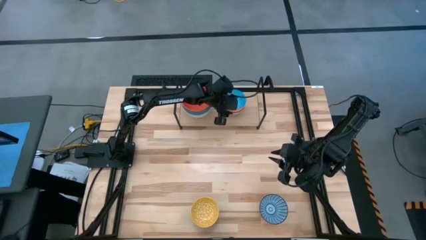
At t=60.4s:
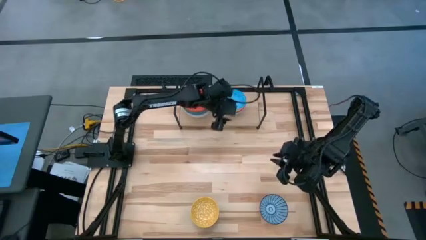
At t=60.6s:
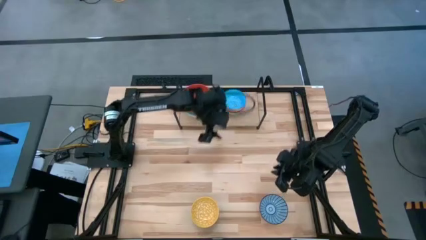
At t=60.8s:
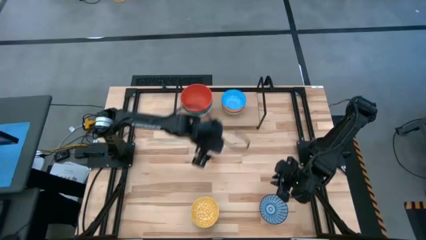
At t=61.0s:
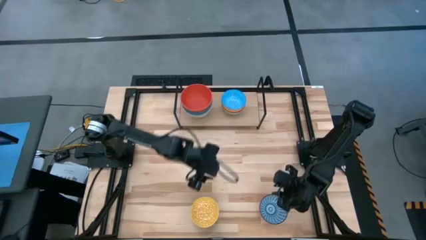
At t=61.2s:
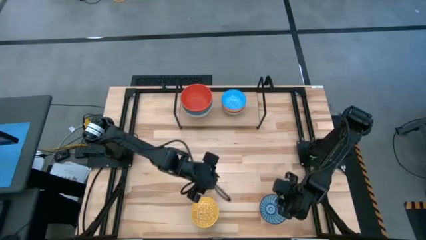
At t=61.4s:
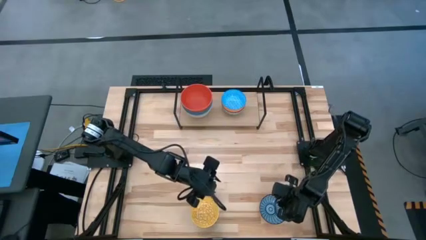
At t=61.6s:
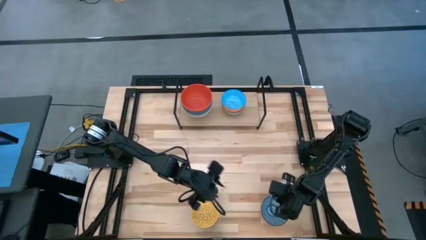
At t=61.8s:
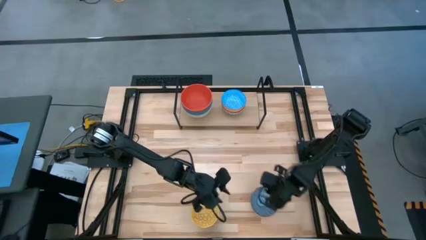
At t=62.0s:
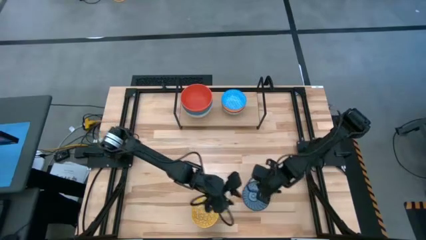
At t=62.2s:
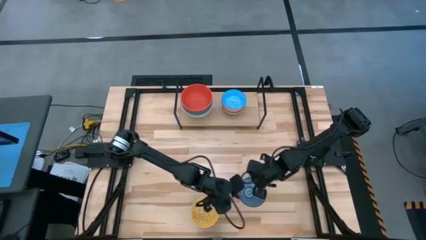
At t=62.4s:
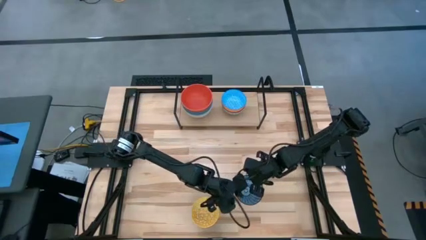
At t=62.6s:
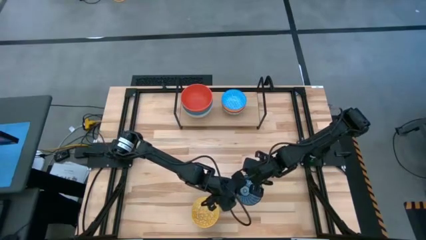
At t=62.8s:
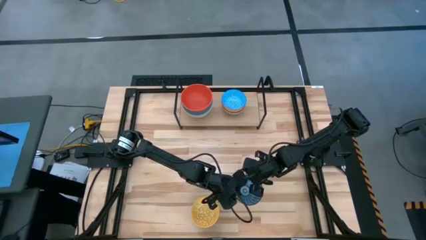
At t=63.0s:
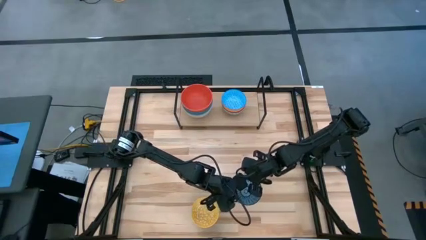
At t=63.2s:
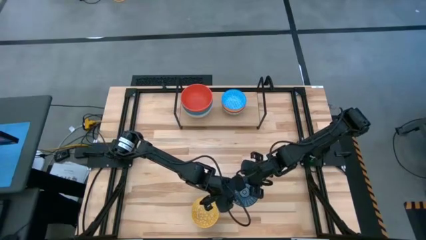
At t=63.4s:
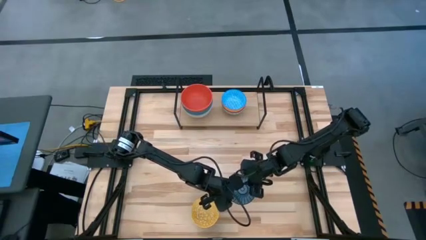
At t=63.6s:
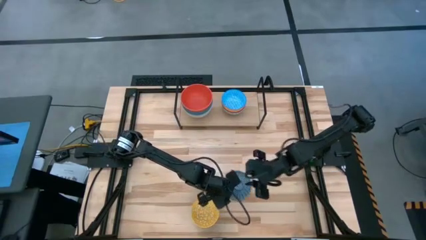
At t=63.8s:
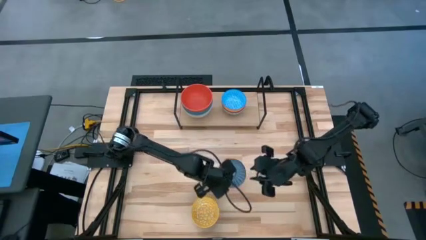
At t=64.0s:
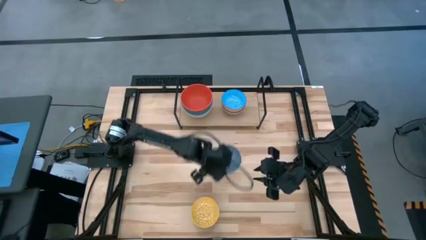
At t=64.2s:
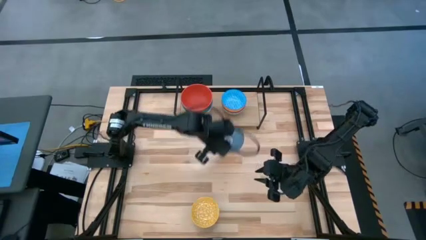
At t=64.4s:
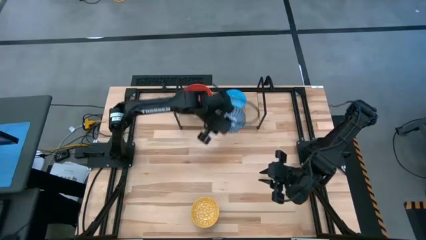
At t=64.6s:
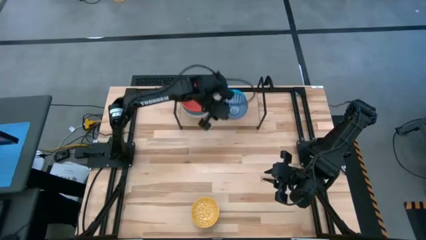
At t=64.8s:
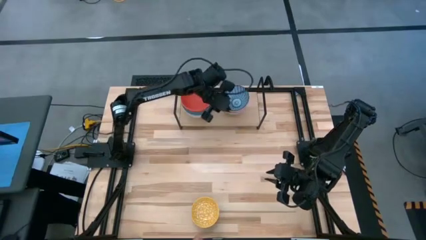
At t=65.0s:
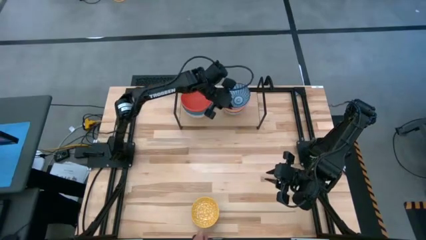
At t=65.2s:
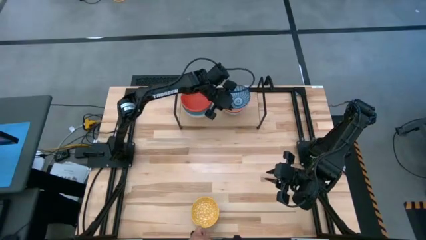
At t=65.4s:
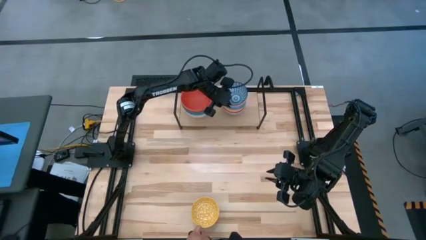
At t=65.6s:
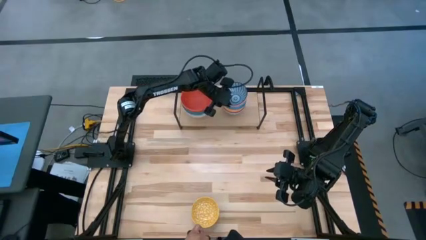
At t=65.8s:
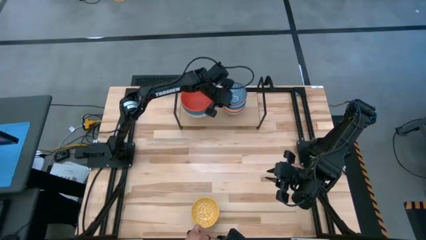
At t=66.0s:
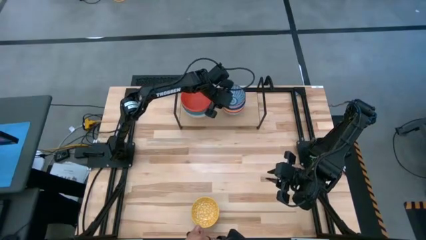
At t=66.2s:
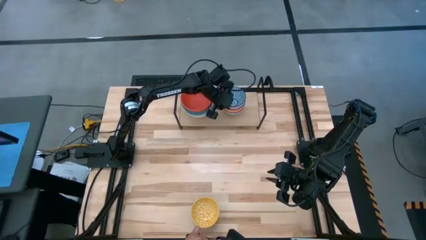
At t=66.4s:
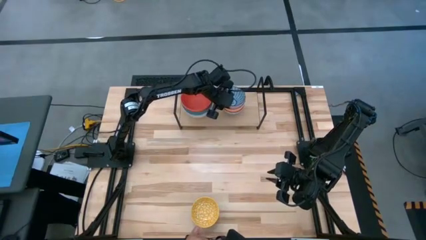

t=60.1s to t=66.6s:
Task: Place and stack bowls onto a shelf
Stack the blue pattern bowl on top of the light blue pattern bowl on the shelf

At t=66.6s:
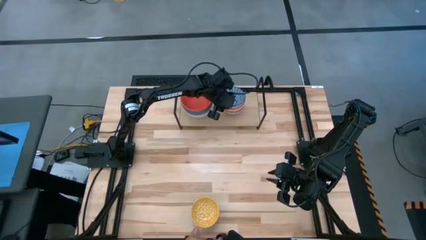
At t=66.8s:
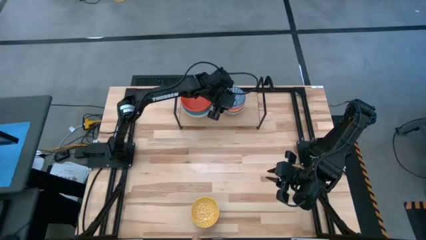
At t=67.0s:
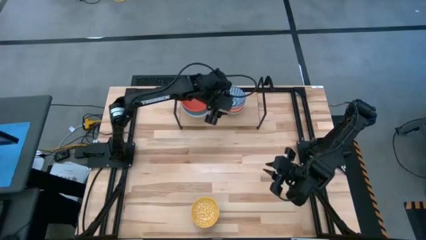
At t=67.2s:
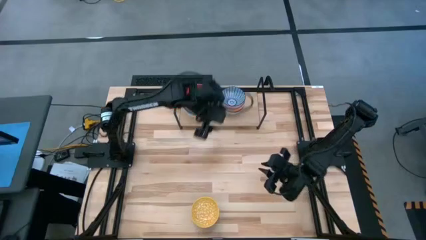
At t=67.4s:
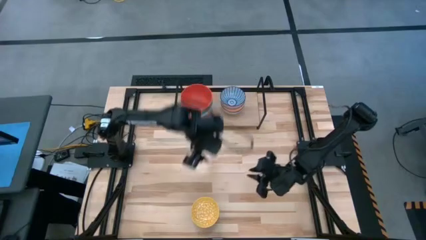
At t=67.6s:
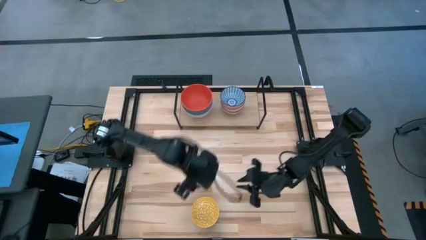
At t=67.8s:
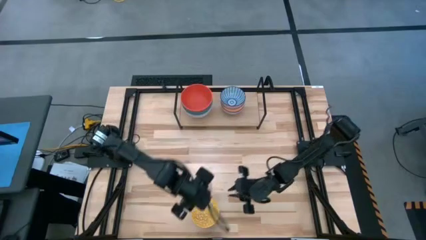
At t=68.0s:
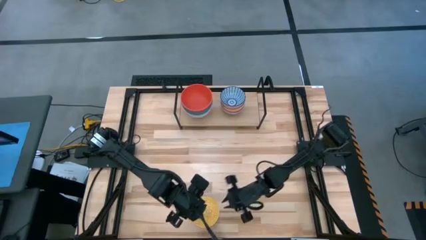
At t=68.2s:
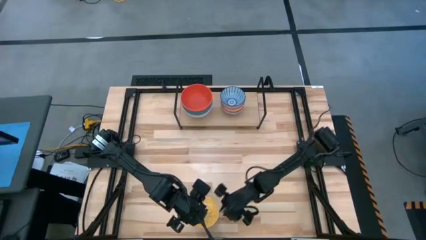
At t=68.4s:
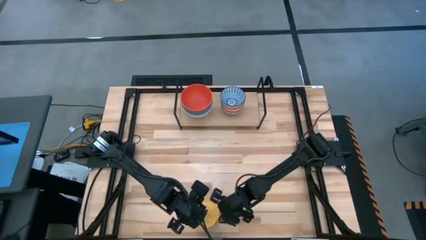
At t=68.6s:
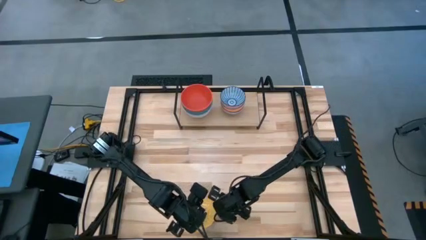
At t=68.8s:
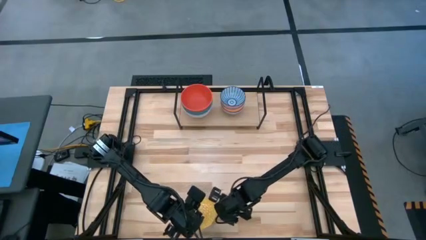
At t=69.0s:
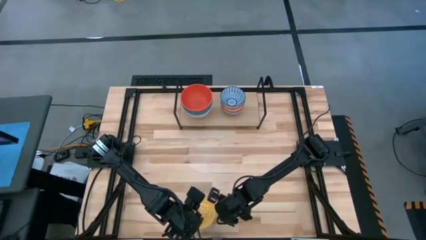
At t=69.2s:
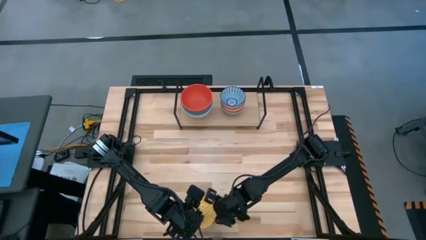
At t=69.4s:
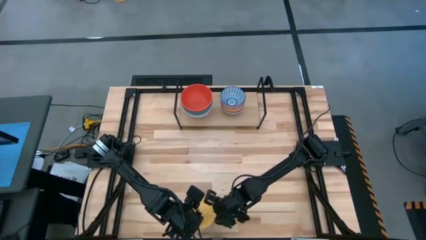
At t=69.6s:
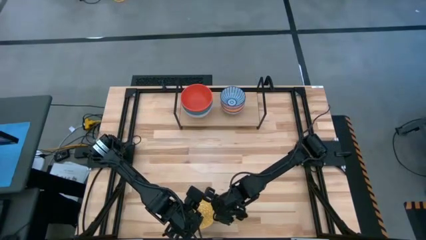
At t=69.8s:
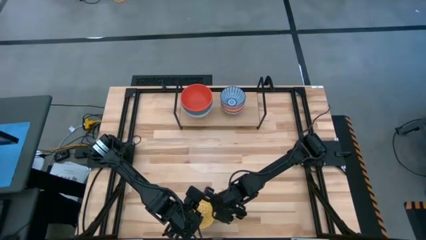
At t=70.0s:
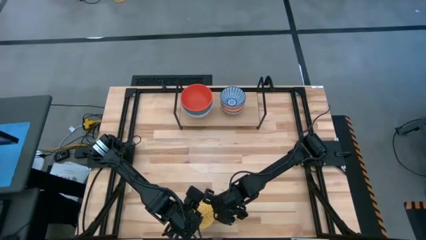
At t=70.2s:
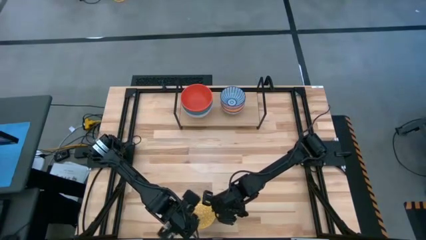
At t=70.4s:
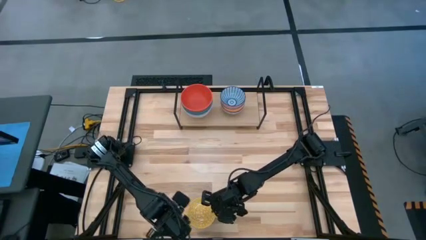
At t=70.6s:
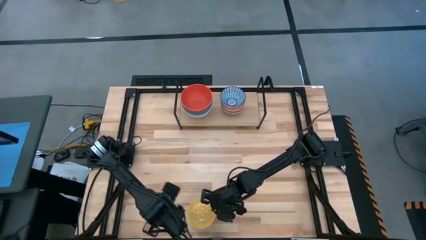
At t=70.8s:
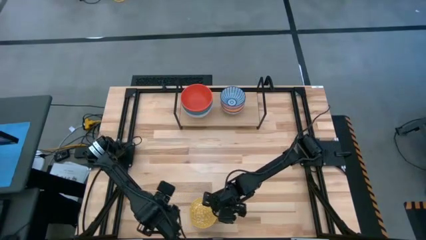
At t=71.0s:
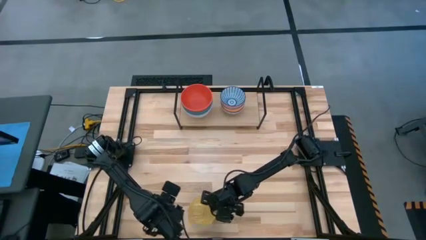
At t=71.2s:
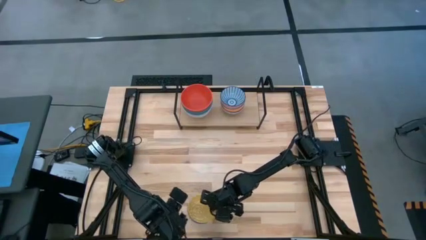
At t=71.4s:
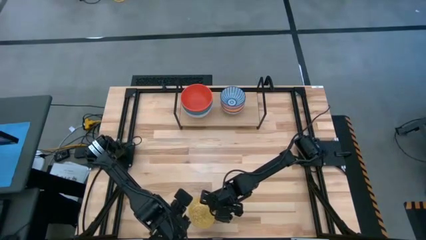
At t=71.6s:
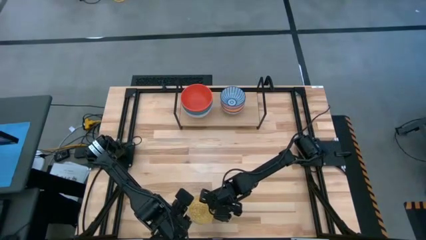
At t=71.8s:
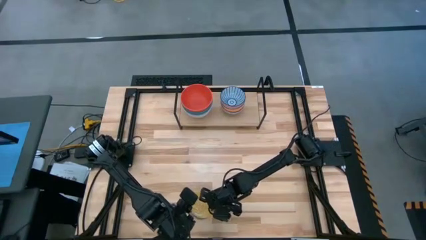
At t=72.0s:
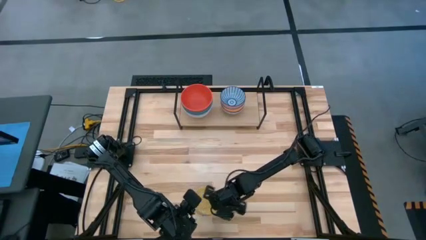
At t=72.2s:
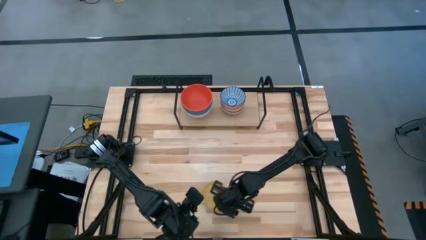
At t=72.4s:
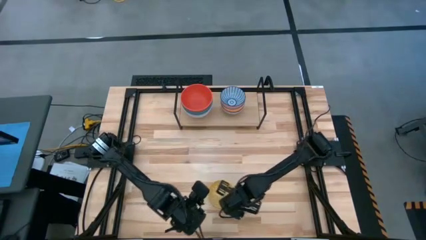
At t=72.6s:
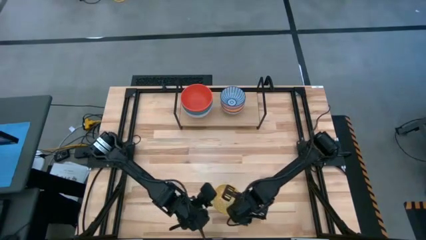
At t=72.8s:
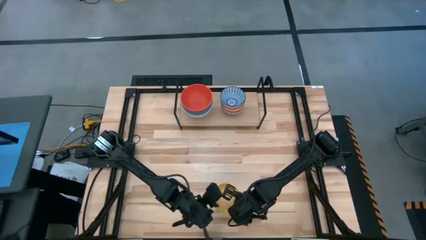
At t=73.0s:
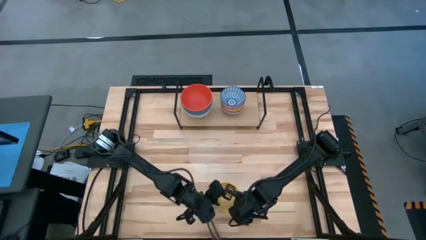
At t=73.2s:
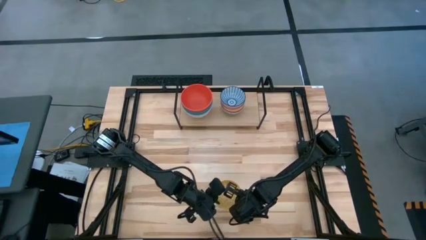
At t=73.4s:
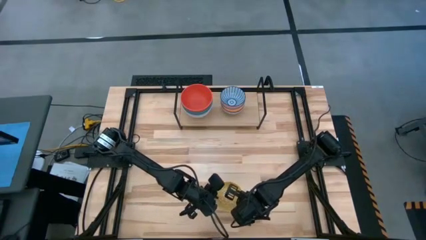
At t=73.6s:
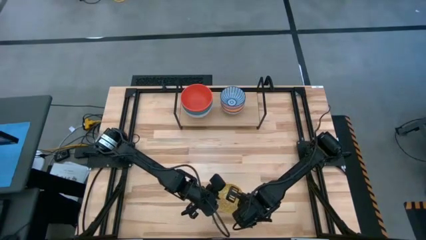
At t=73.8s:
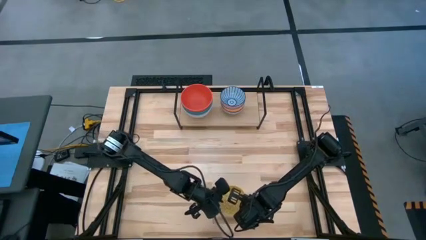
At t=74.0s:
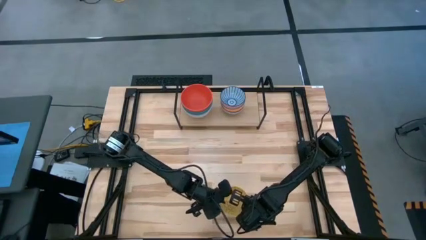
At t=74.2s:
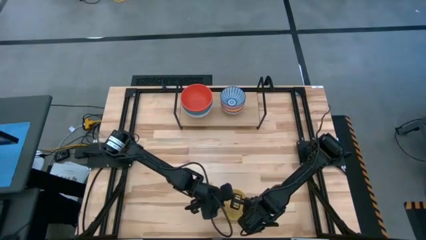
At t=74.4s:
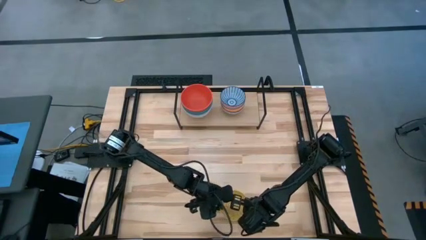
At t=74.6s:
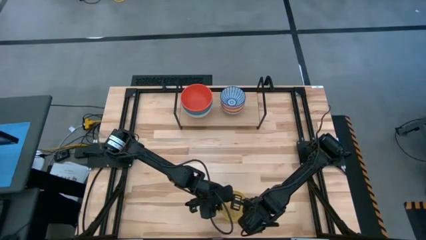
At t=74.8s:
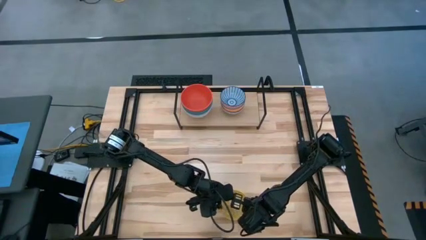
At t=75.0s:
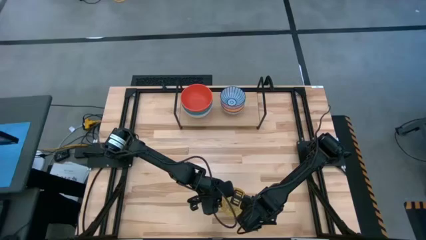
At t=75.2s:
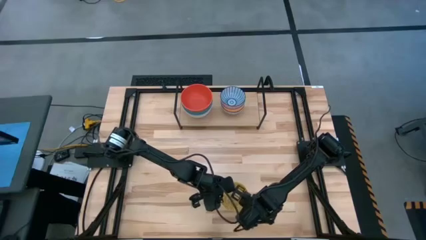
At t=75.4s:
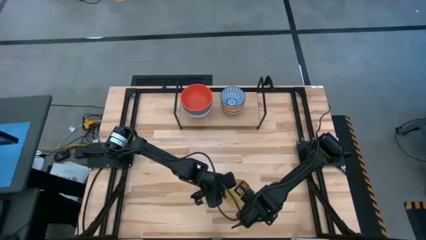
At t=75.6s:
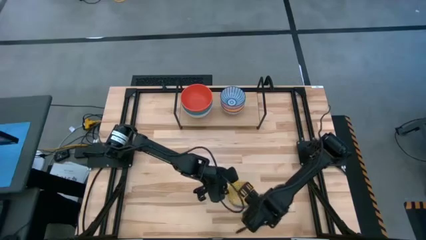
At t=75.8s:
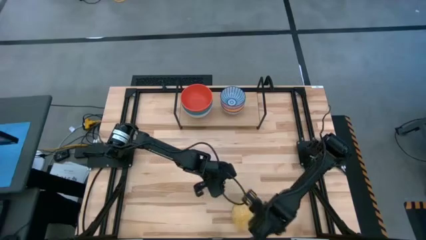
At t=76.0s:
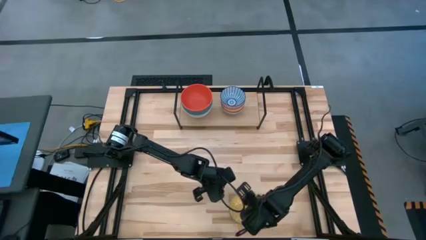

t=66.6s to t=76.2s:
Stack the yellow pattern bowl on top of the blue pattern bowl on the shelf

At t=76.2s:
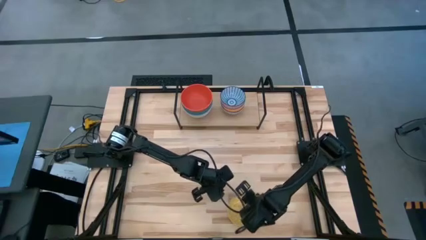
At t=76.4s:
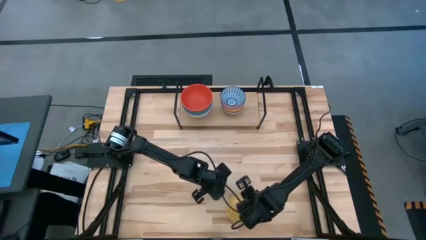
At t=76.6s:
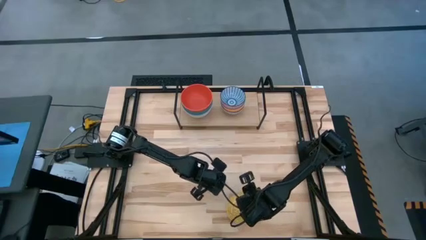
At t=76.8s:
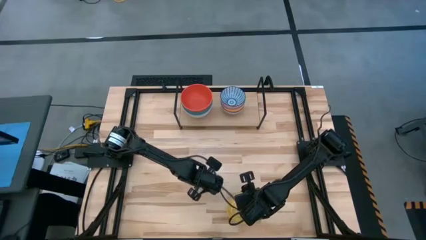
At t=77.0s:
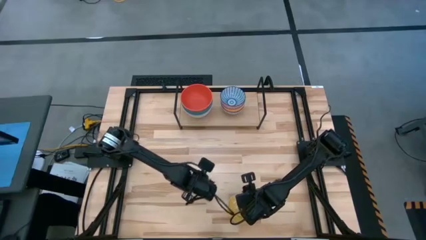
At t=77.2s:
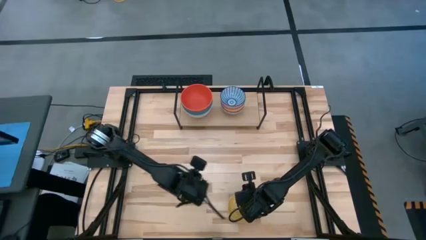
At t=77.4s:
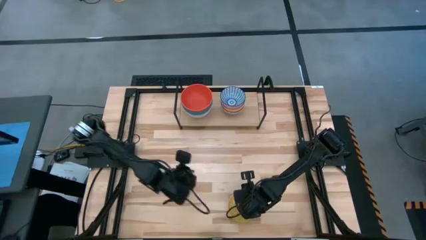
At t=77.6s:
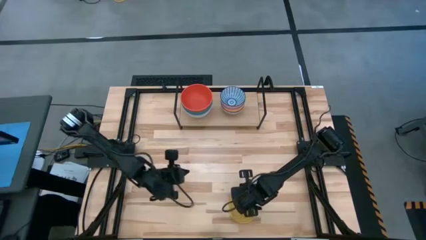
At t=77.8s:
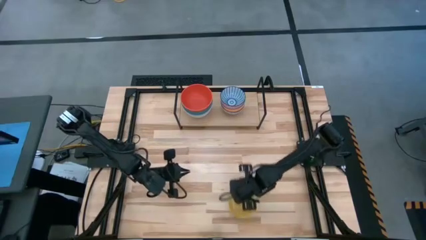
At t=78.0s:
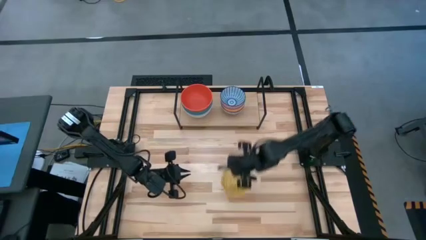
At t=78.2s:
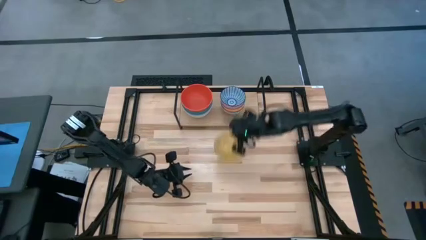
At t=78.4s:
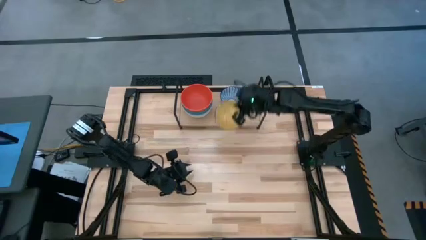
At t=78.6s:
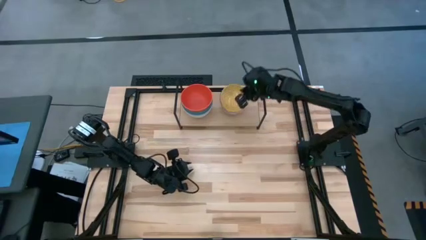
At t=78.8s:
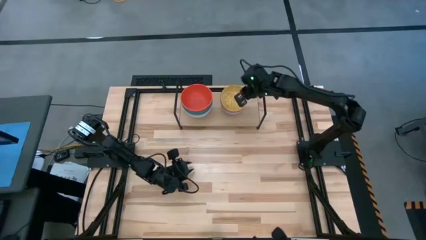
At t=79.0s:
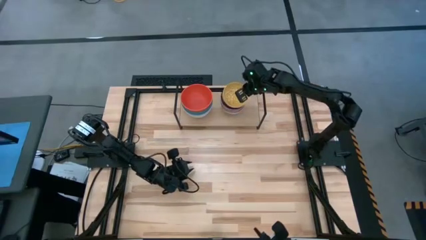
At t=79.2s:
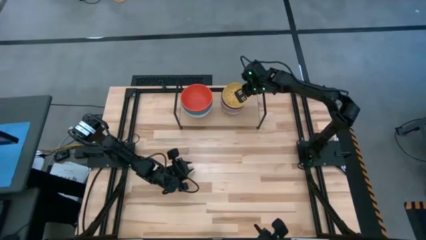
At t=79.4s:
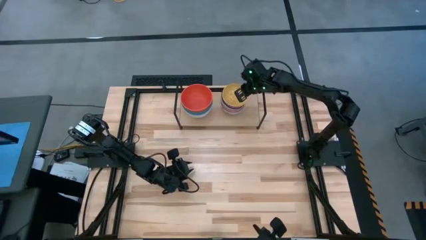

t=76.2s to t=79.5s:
Stack the yellow pattern bowl on top of the blue pattern bowl on the shelf
